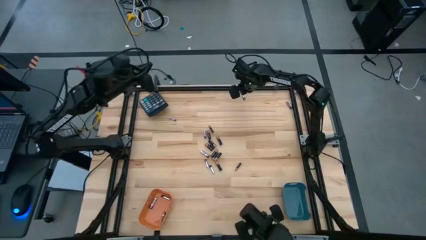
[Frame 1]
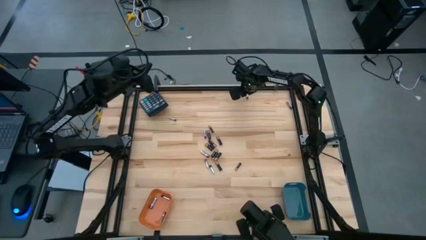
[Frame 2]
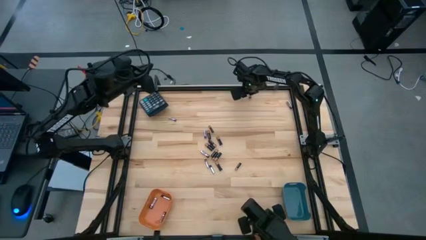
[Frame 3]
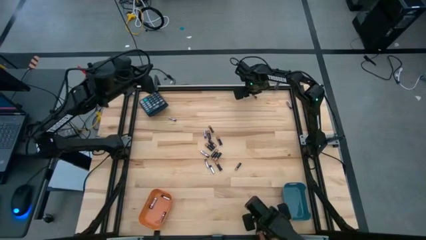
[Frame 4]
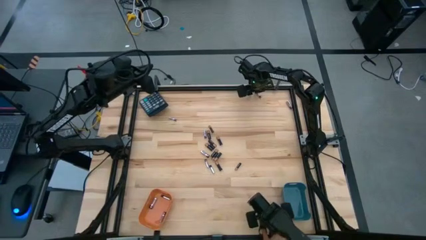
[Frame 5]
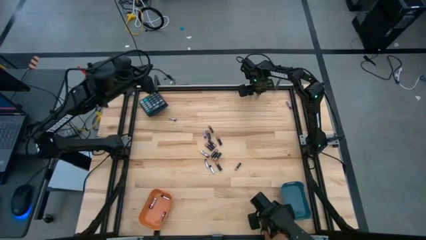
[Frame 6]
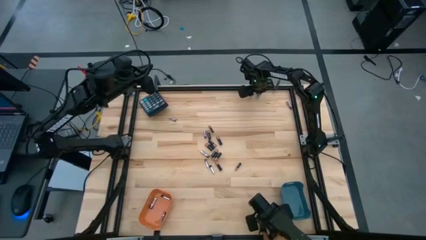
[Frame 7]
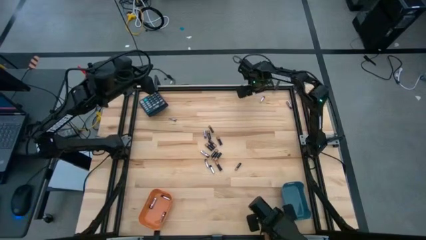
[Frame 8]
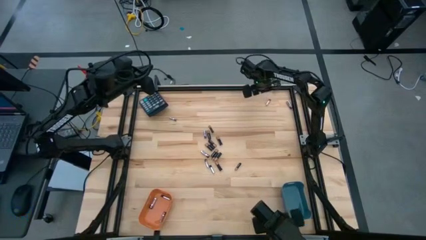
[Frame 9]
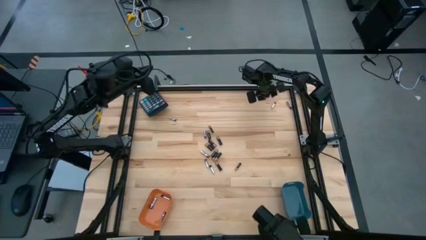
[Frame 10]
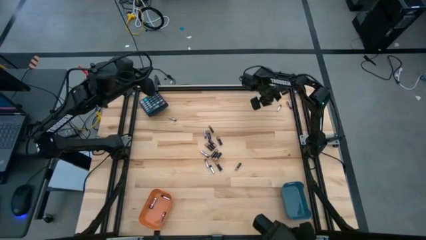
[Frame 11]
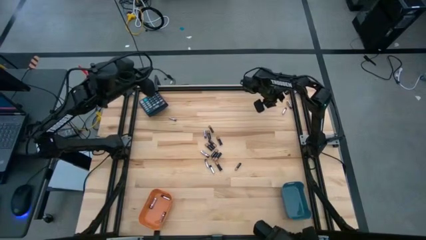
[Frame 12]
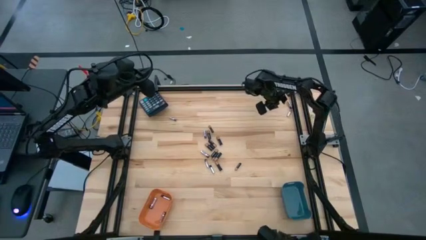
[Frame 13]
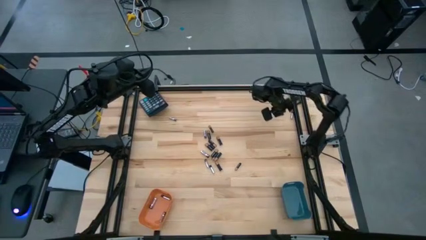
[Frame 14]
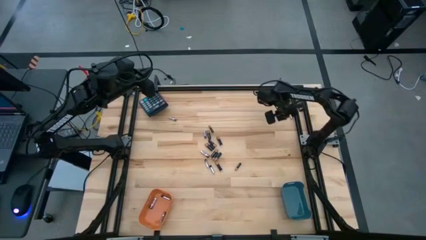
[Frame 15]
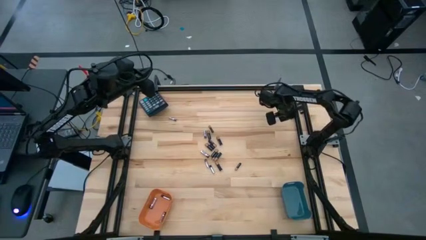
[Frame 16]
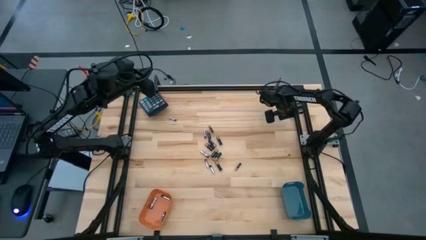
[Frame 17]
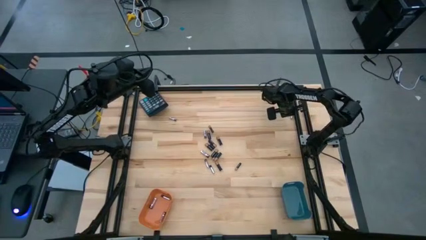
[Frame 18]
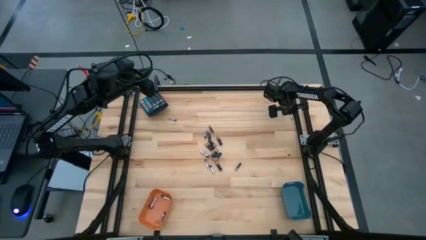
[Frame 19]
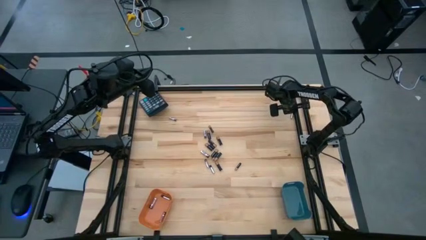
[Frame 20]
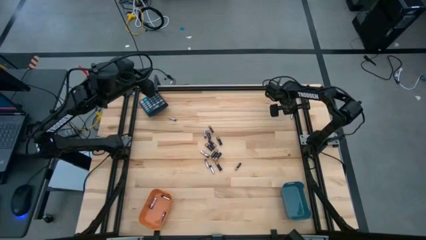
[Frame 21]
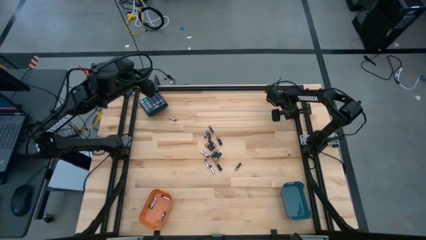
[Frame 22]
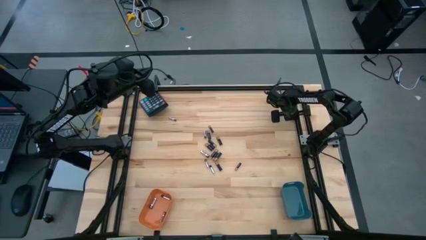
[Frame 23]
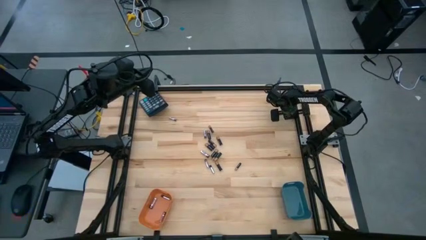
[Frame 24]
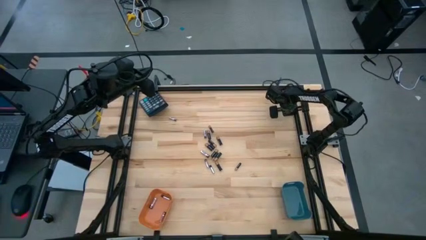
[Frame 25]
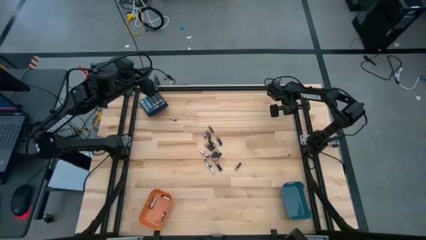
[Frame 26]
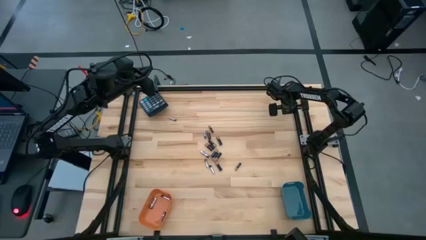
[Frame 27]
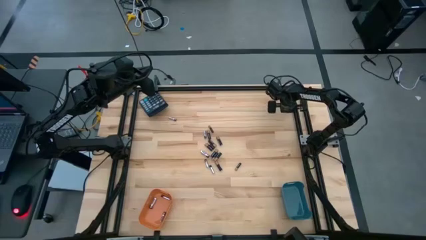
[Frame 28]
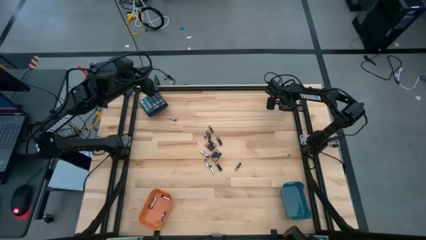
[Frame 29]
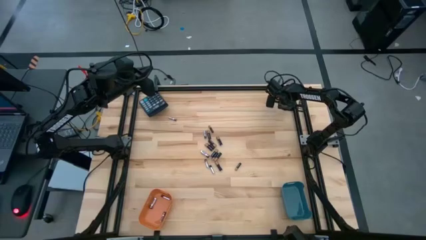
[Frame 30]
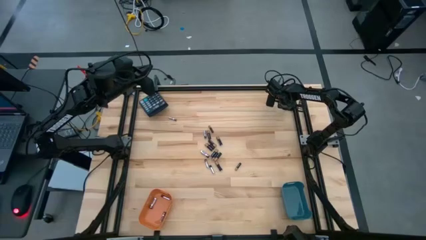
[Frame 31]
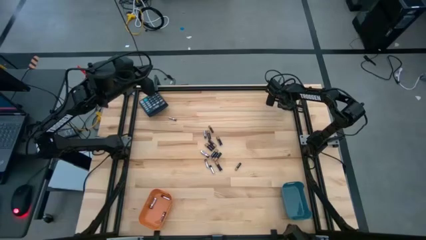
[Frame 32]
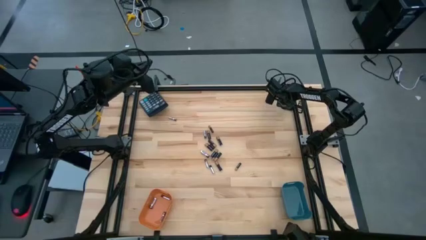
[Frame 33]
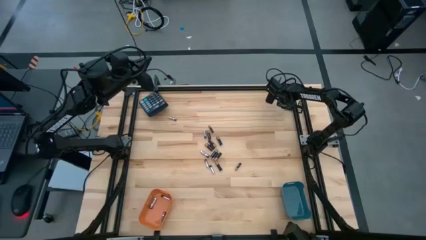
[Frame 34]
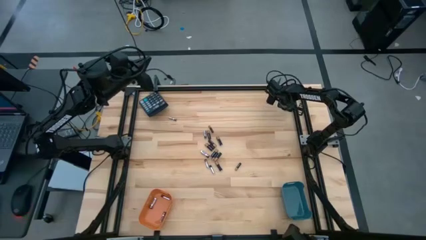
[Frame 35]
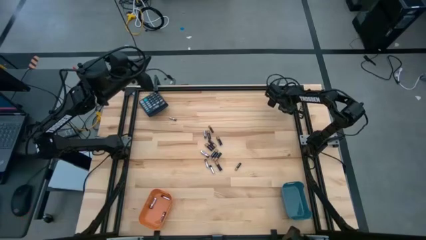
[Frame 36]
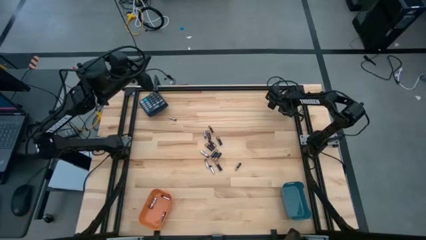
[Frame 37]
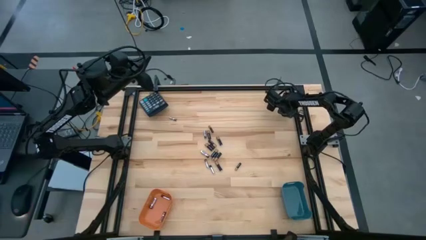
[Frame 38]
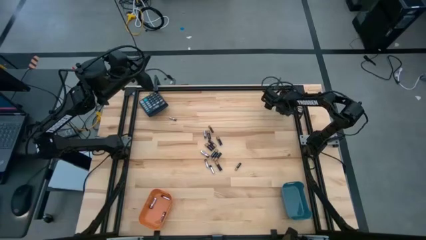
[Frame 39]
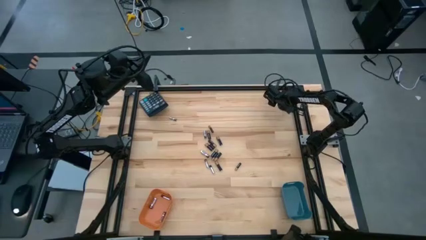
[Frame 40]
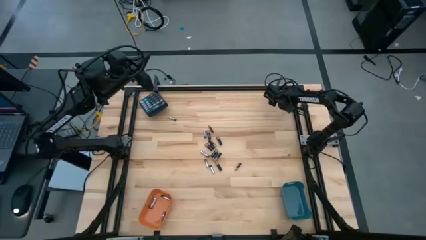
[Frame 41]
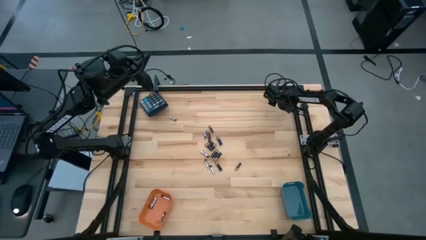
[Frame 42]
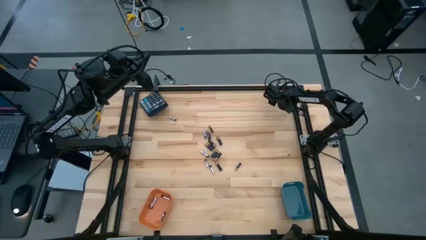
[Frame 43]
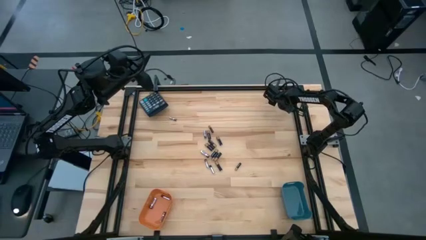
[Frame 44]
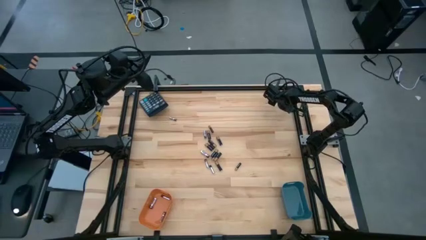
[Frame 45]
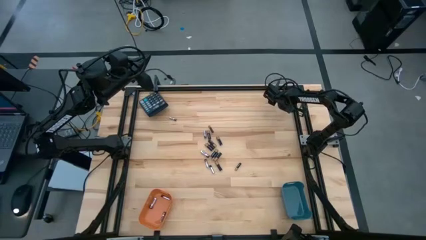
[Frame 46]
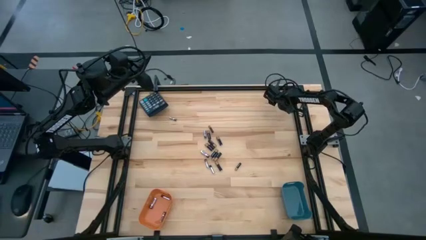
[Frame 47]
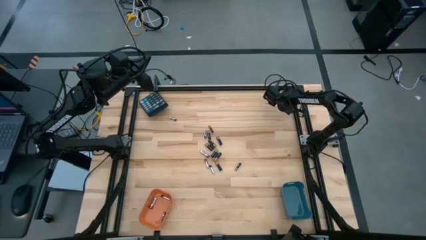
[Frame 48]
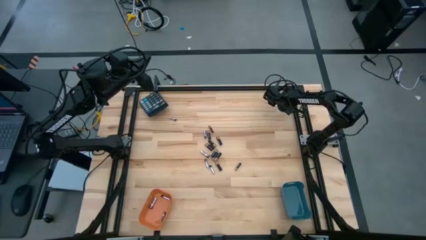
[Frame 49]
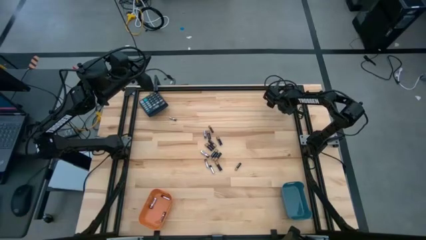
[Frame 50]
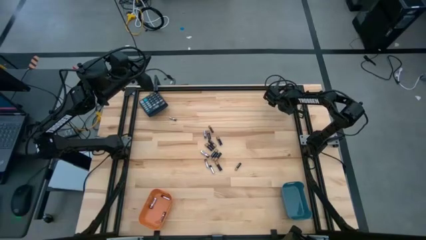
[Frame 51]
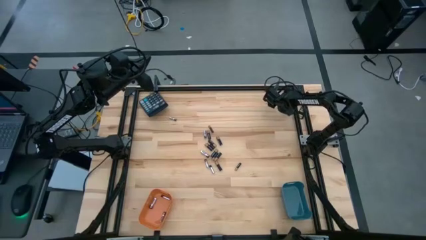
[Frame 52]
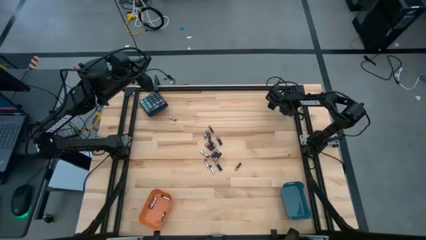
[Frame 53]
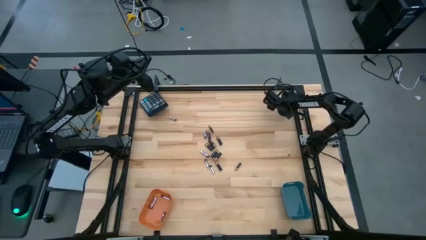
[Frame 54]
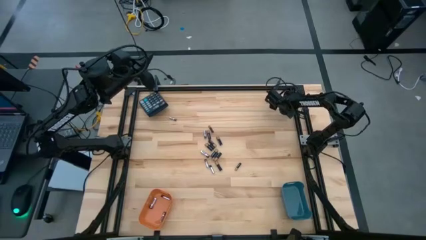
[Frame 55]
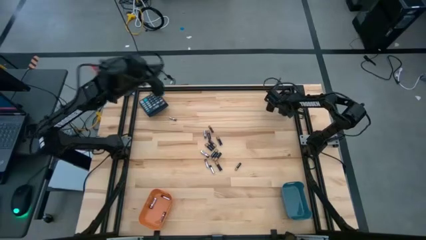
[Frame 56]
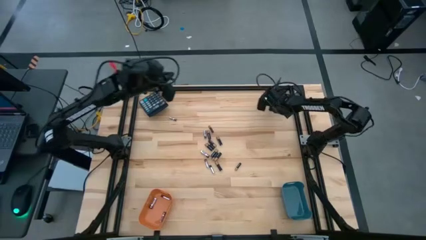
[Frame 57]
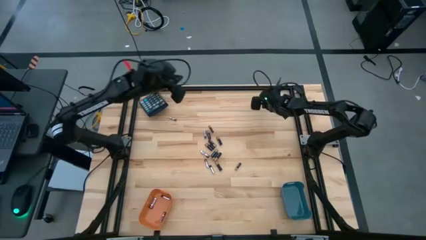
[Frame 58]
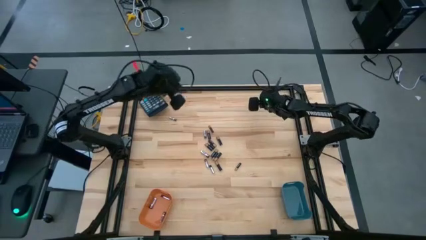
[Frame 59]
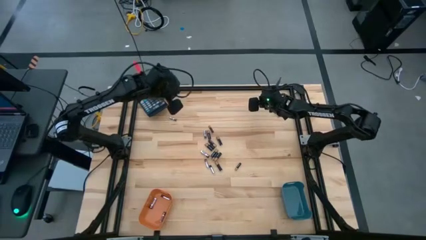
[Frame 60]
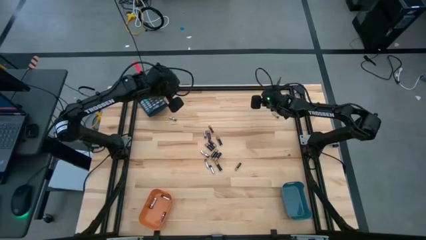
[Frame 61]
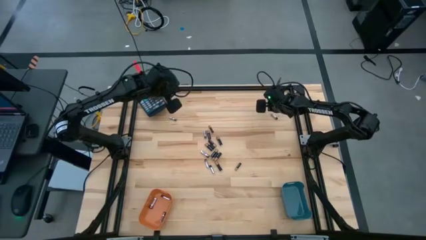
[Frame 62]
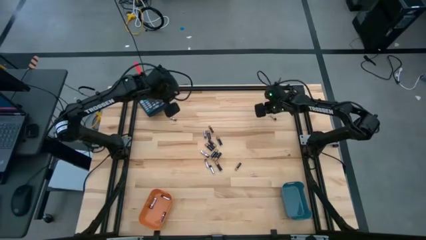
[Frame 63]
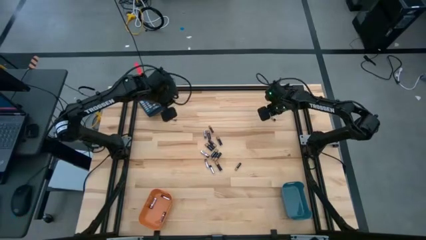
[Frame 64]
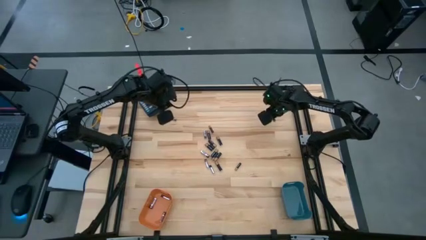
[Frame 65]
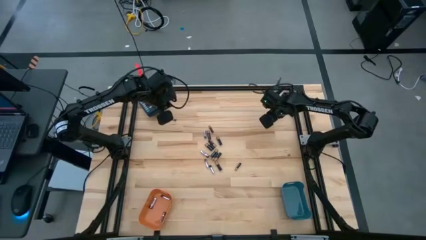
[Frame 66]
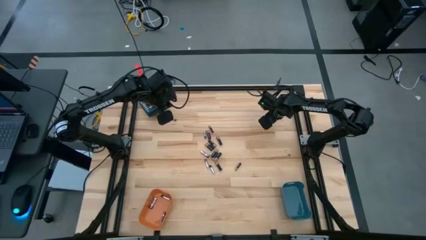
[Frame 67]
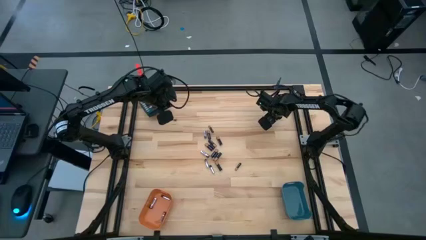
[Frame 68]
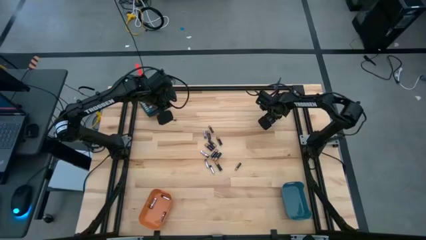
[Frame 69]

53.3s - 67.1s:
Task: Sort batteries
Put the silver battery into the orange bin

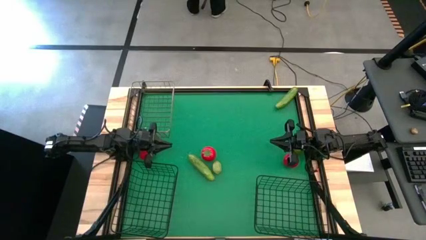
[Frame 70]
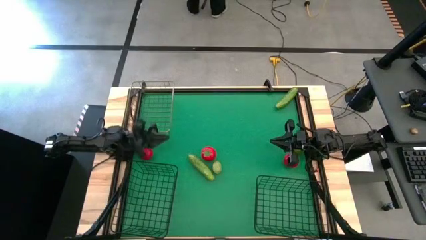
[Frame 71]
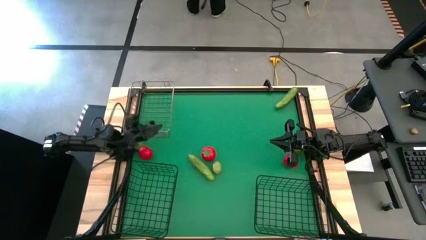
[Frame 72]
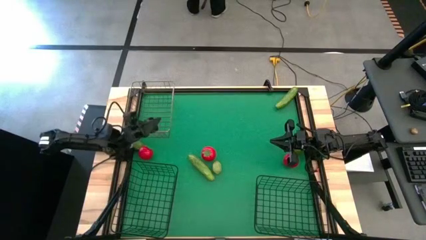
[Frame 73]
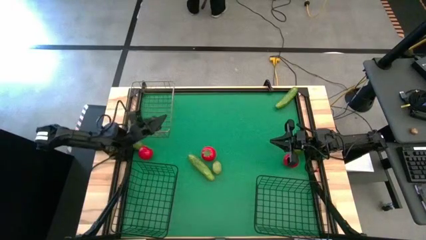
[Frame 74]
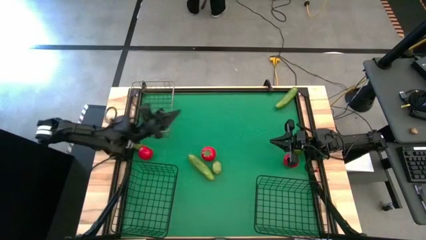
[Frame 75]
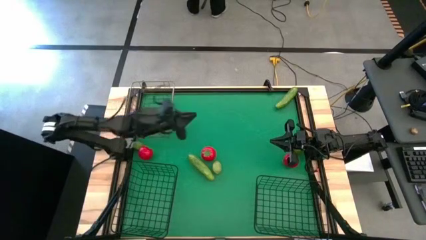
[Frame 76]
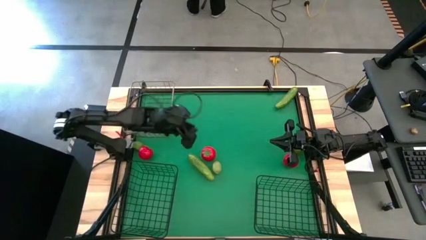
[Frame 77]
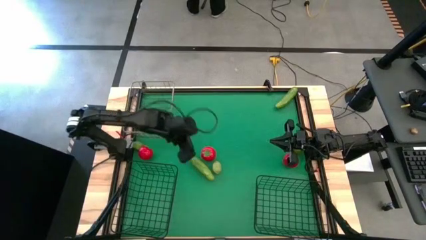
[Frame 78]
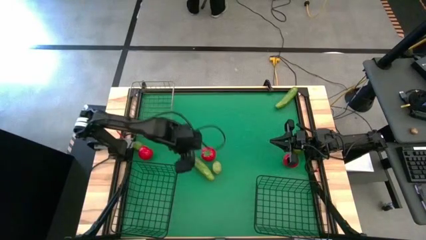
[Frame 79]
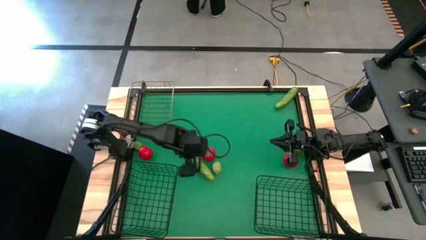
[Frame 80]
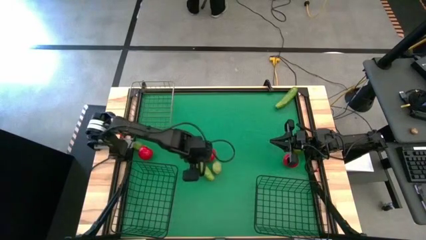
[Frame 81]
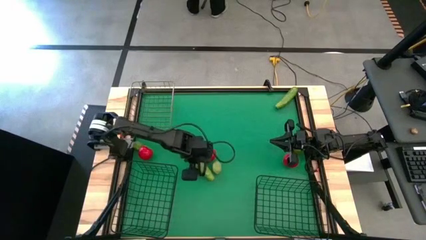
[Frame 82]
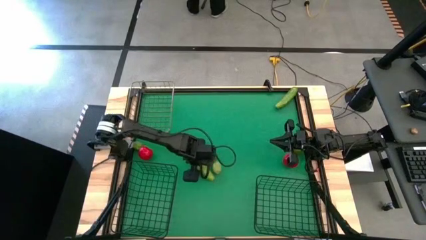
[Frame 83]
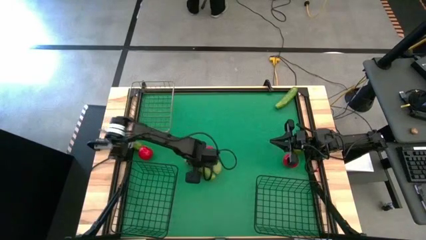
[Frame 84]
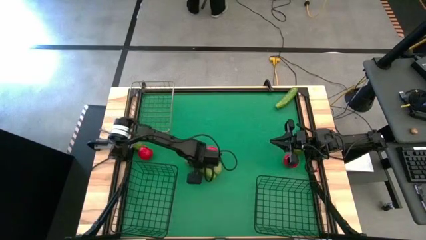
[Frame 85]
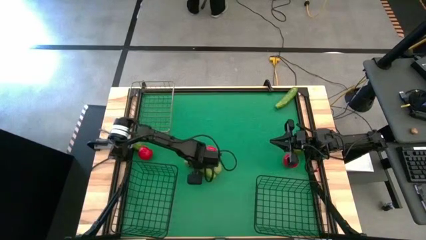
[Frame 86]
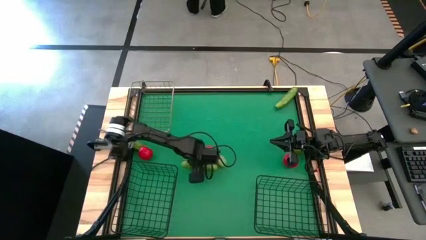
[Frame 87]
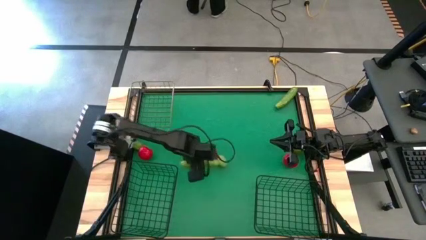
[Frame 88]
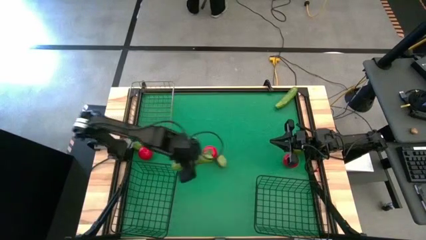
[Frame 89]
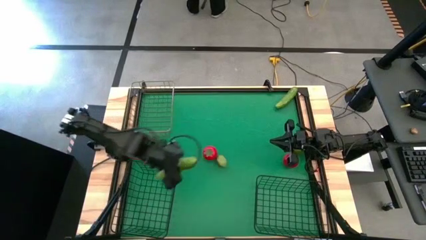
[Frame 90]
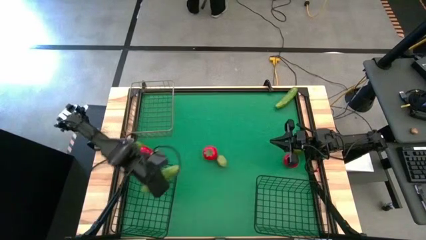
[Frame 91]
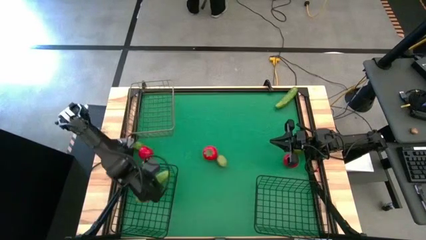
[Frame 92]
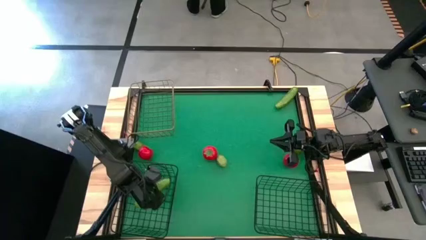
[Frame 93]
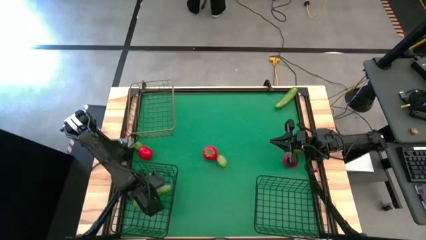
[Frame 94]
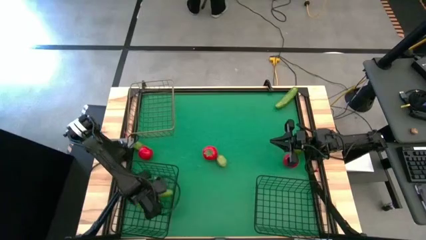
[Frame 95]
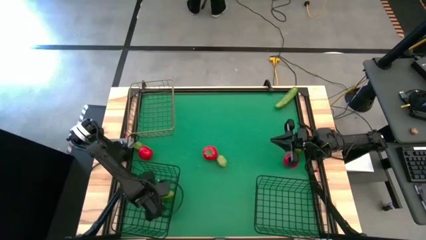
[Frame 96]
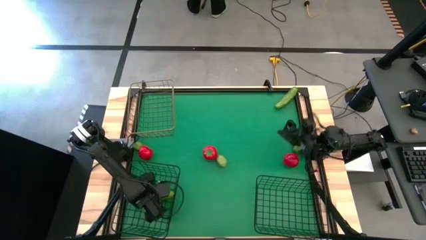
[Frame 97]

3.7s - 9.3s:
Task: Sort produce into baskets
Put the bottom cucumber into the bottom left wire basket
